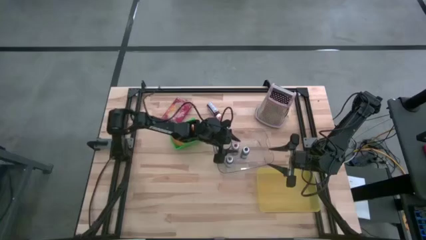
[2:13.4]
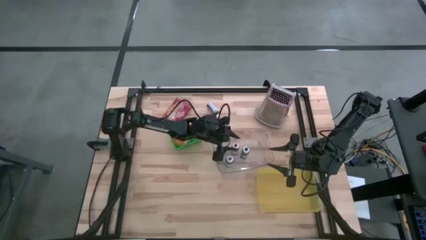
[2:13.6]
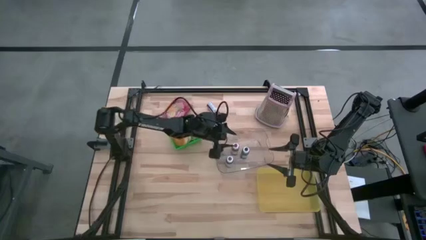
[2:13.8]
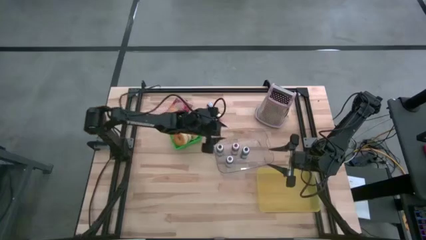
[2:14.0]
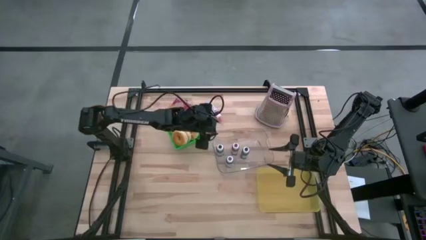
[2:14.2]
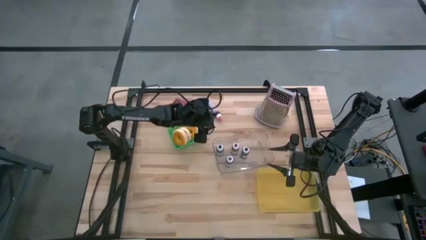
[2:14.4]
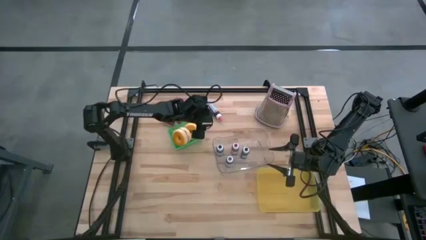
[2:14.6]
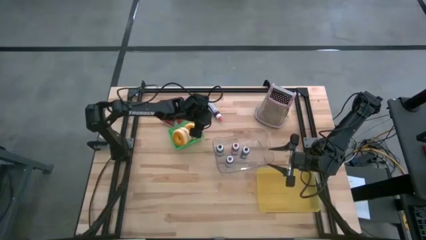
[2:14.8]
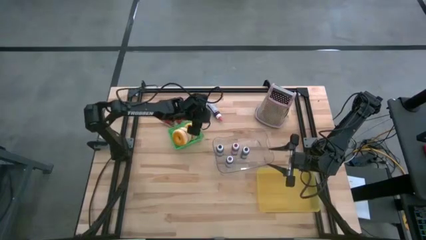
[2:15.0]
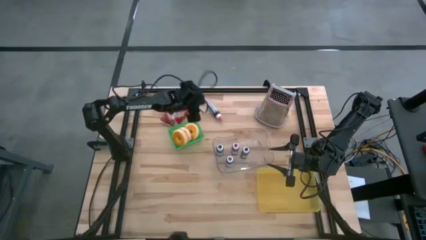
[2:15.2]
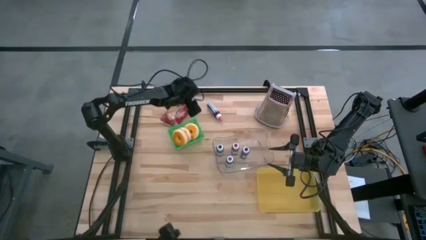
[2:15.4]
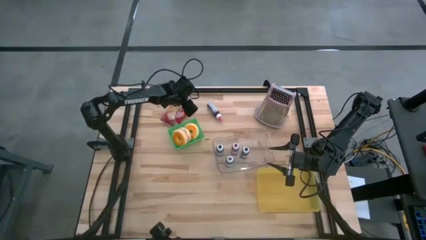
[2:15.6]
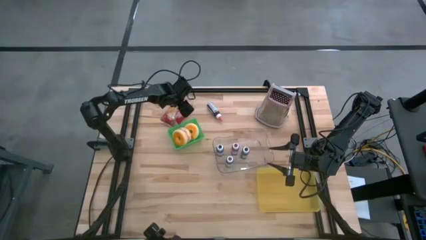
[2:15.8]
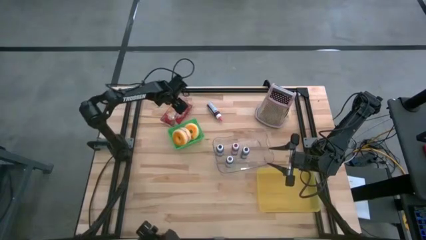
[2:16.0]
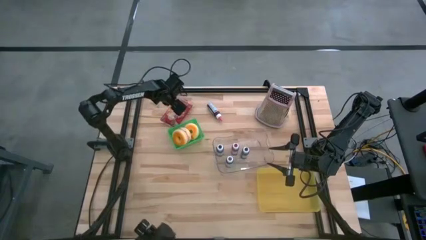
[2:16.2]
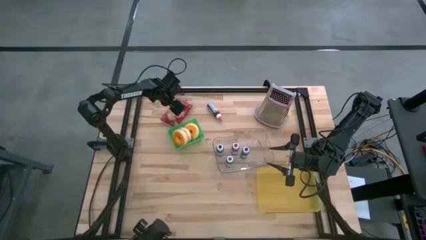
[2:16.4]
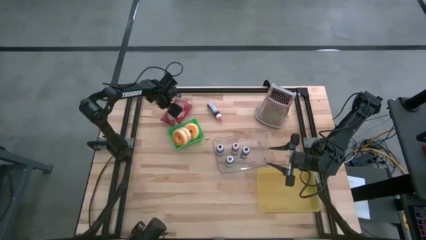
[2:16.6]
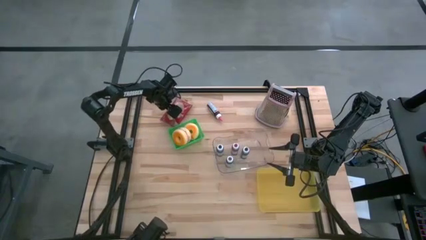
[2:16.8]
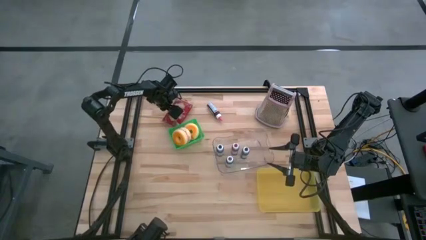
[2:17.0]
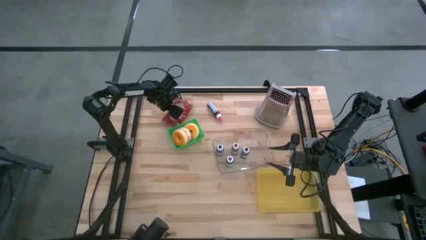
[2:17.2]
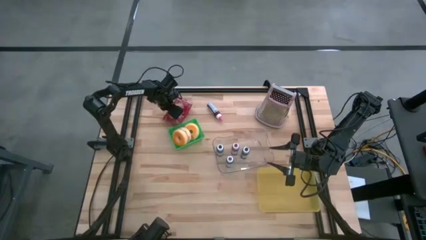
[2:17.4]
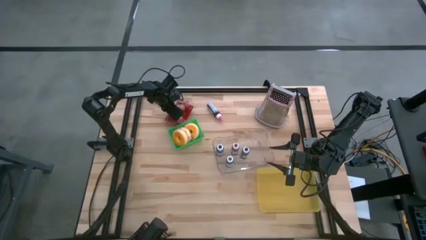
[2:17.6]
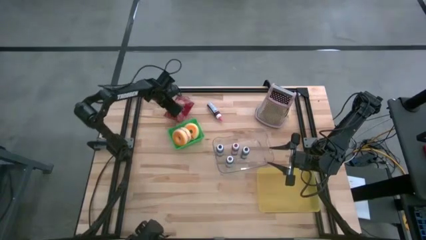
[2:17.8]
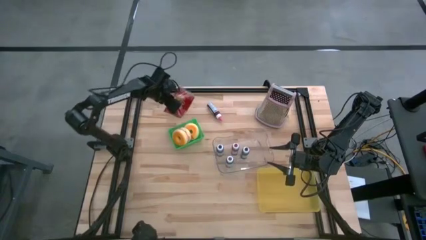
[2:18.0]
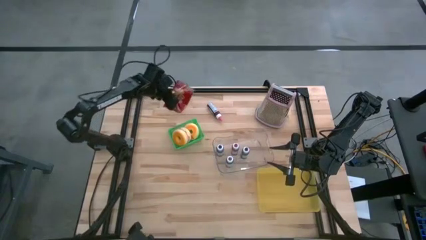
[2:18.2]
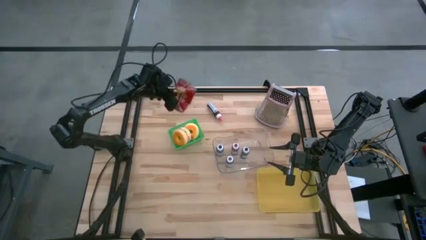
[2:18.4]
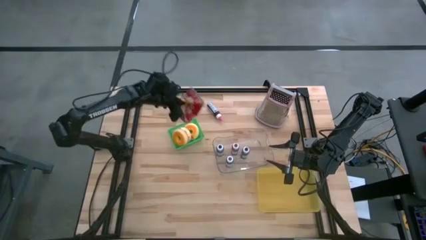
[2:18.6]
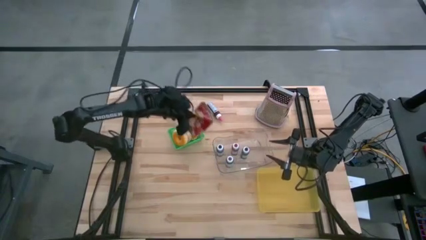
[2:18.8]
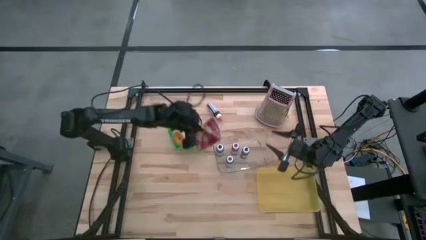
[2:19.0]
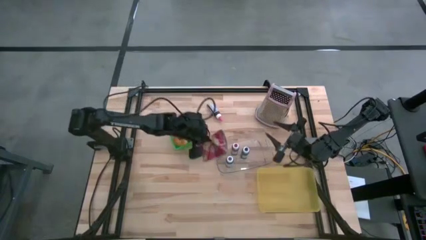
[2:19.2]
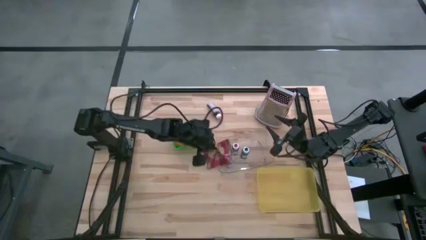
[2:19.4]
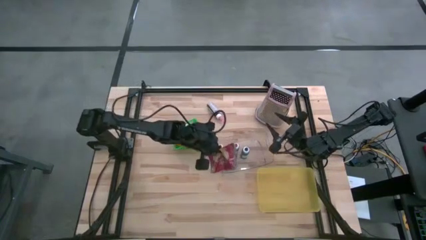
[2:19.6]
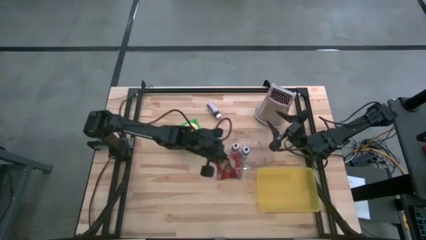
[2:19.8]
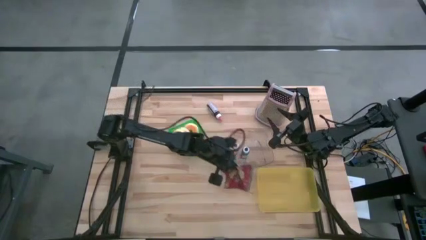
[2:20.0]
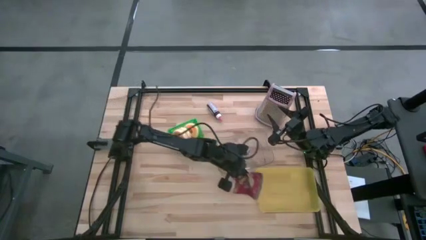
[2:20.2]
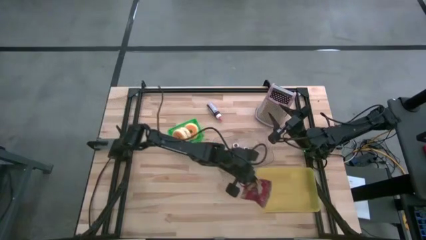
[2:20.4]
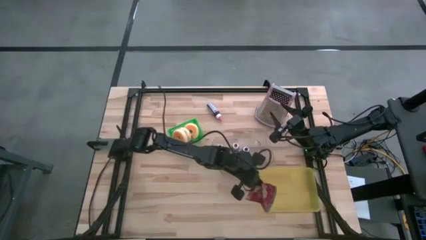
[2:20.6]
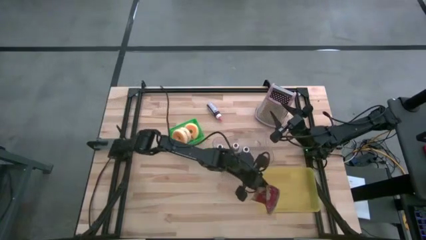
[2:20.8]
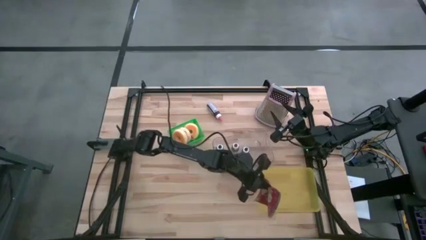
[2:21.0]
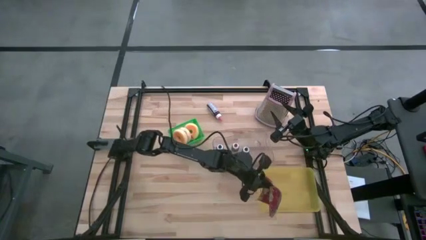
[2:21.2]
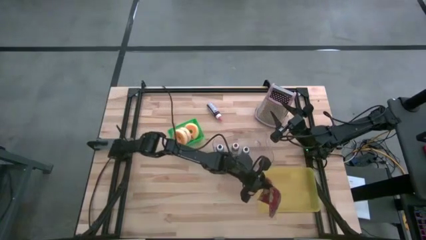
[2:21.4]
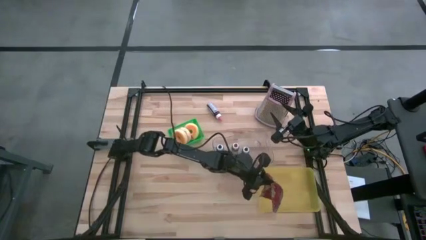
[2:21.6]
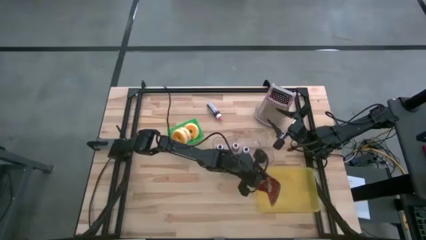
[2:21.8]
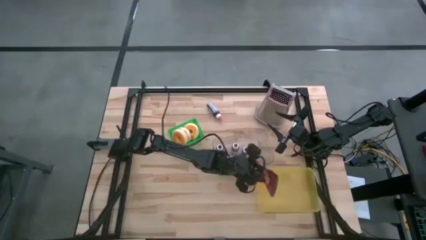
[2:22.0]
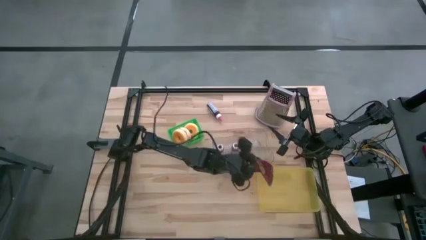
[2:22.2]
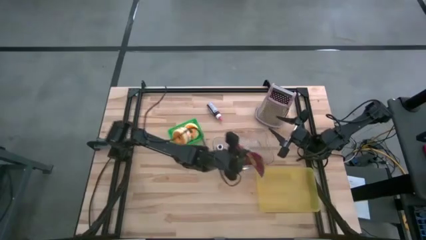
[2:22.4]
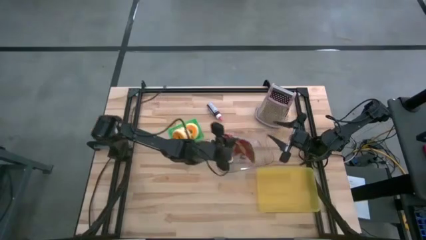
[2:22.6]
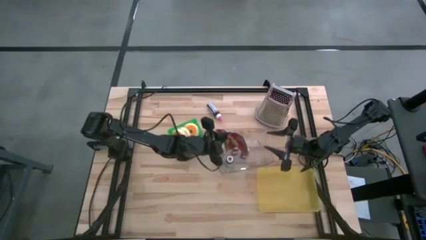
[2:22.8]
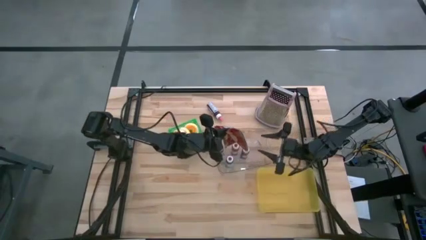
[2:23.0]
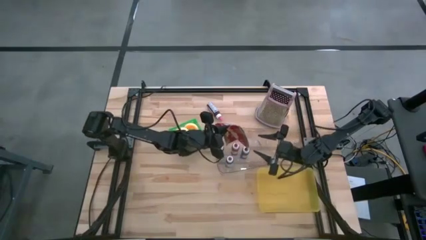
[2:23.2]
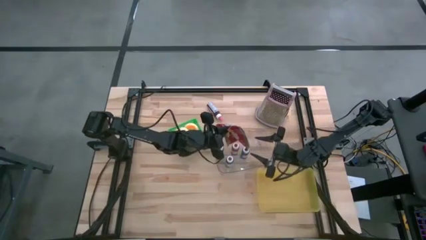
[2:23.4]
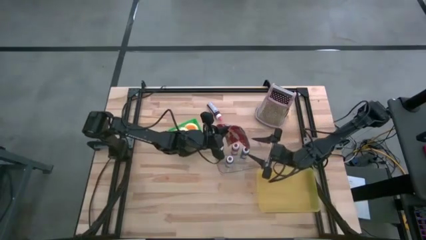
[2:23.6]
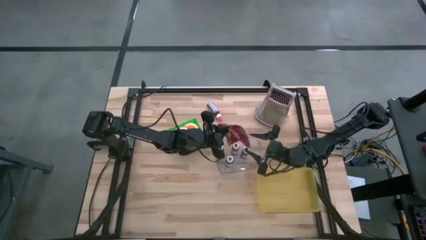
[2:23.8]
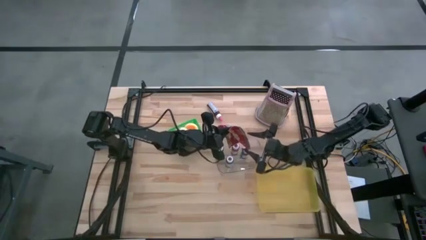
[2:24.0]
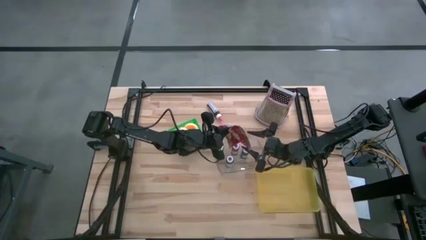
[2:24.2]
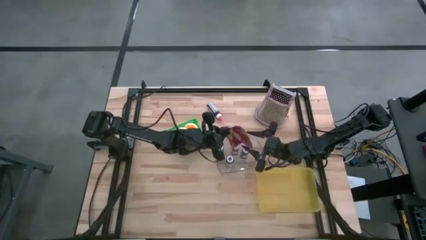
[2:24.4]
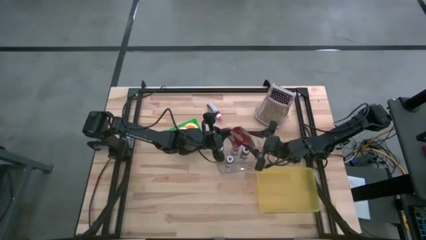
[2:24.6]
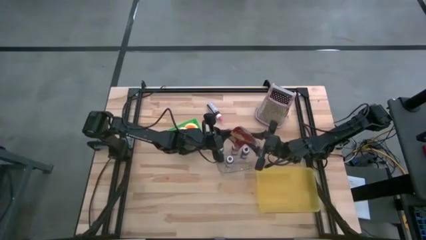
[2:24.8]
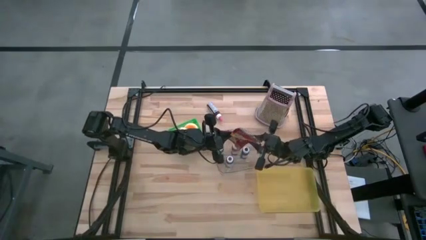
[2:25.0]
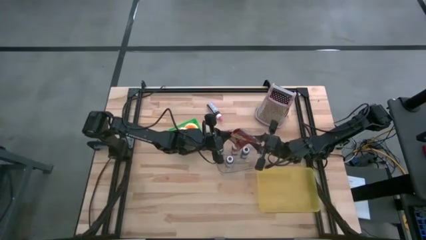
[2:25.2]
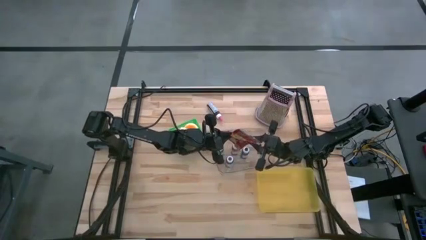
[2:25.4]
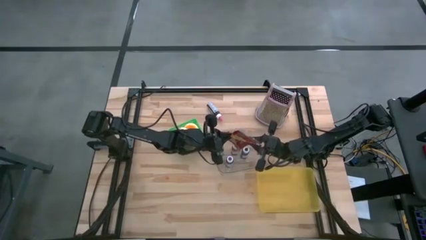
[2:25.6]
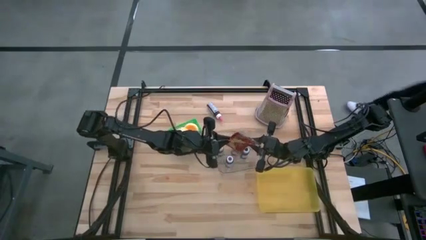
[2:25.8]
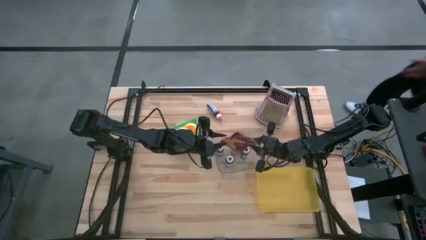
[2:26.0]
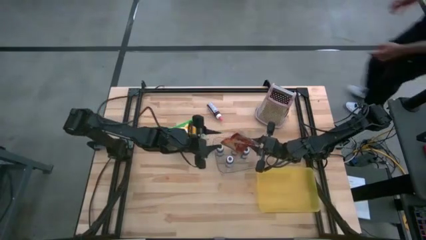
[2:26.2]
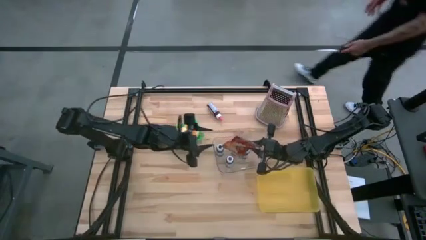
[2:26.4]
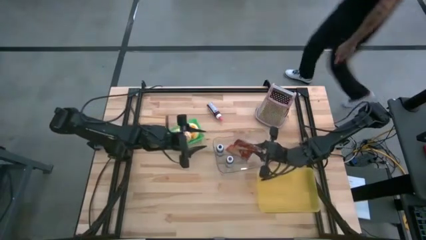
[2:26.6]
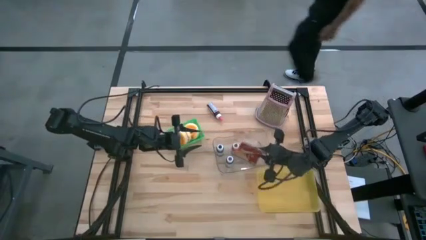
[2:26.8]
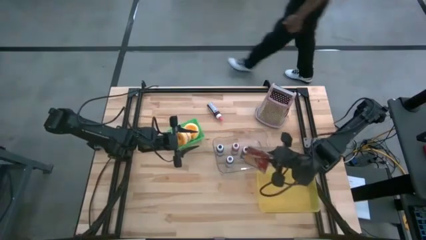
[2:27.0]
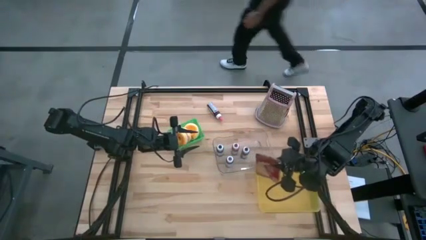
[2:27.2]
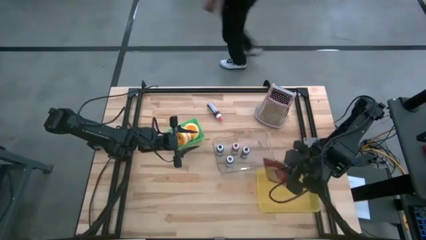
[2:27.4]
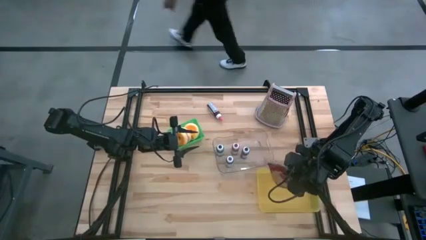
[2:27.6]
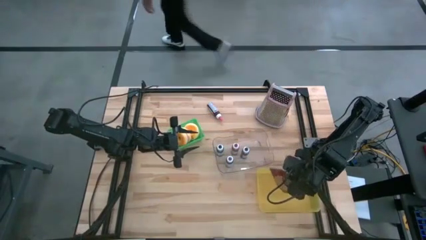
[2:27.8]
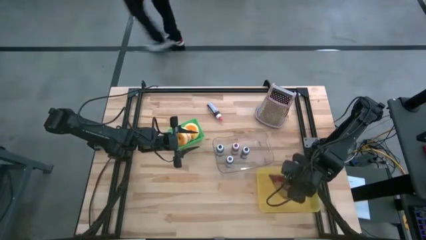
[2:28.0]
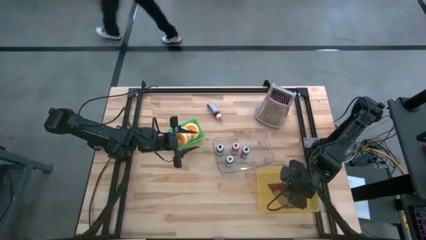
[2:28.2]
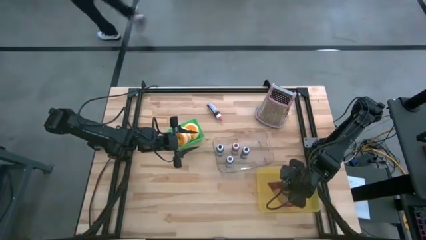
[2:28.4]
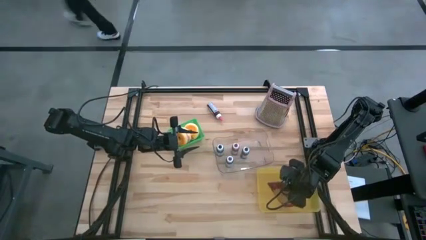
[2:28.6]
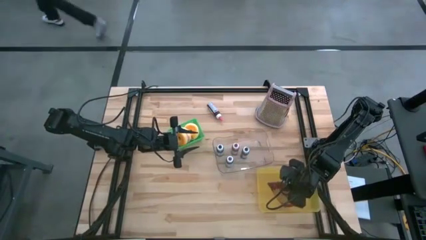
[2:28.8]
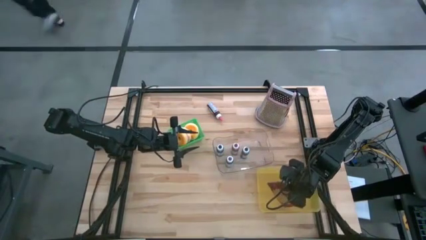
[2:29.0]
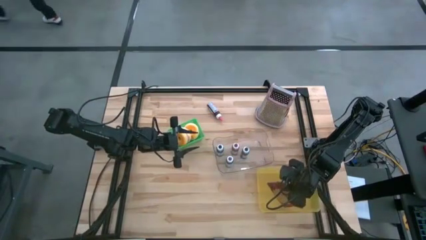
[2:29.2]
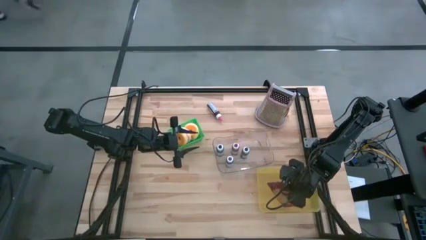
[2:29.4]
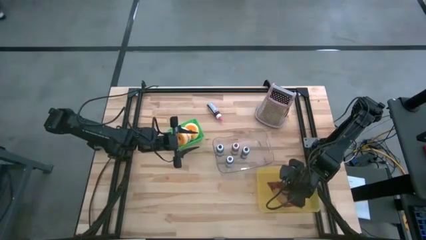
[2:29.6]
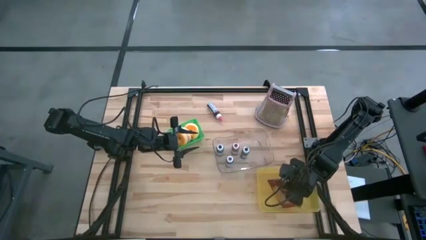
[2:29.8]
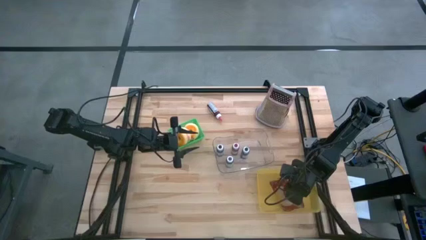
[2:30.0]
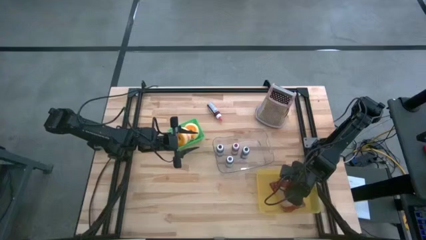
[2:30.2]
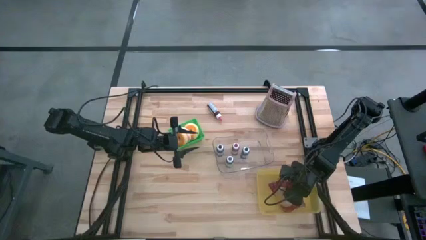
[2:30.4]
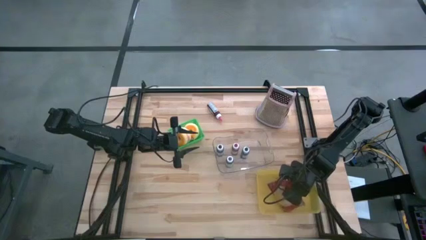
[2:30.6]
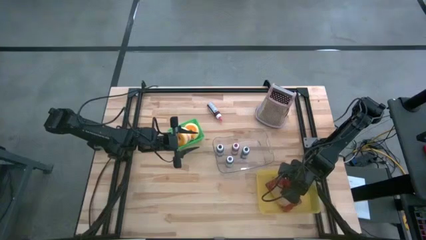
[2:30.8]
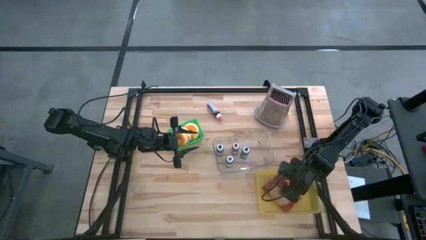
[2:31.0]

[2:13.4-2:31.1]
Task: Pick & Place Food Item
Put the red popcorn bag into the yellow bin
